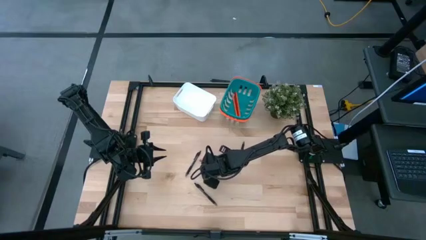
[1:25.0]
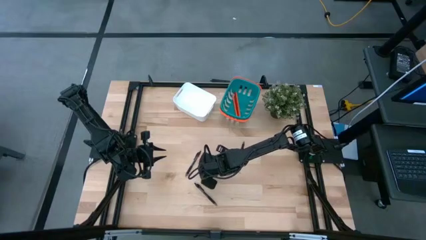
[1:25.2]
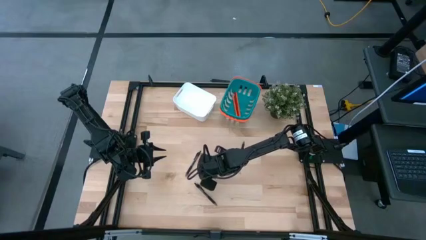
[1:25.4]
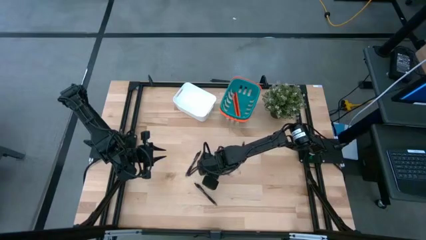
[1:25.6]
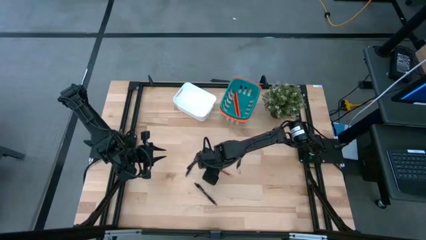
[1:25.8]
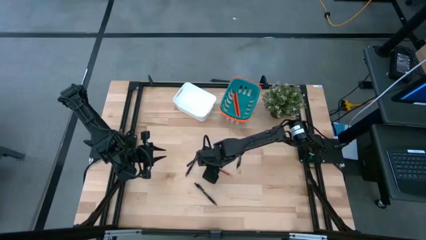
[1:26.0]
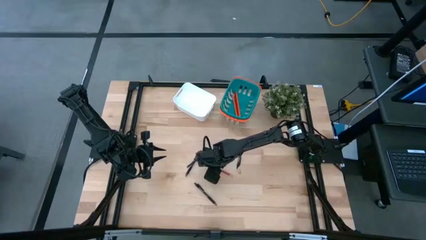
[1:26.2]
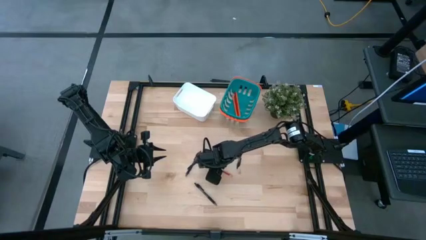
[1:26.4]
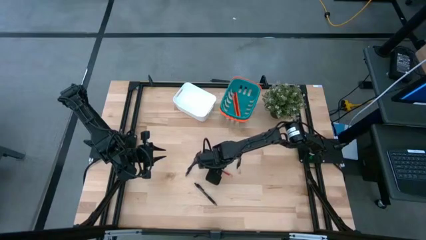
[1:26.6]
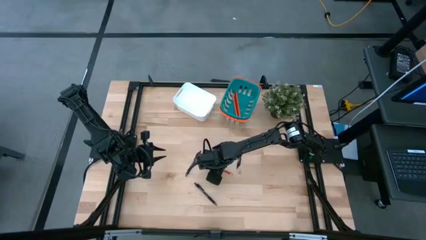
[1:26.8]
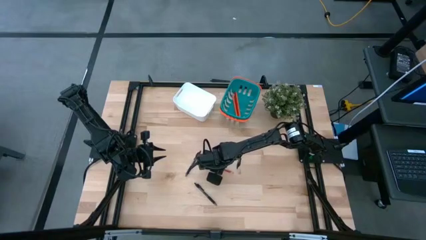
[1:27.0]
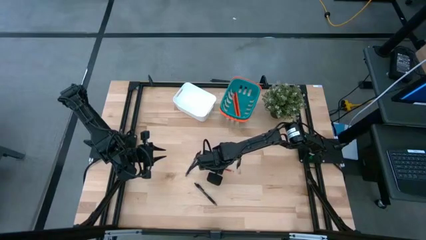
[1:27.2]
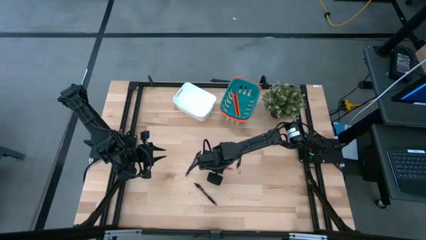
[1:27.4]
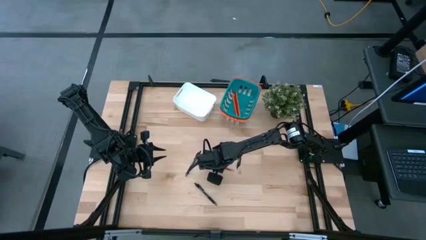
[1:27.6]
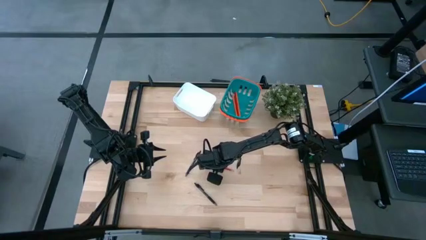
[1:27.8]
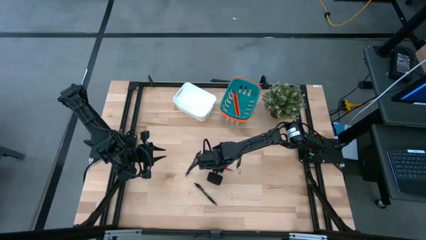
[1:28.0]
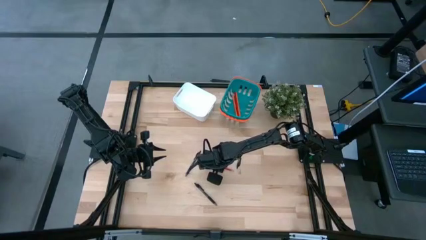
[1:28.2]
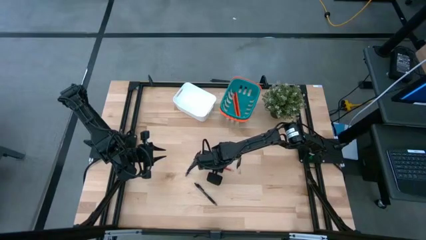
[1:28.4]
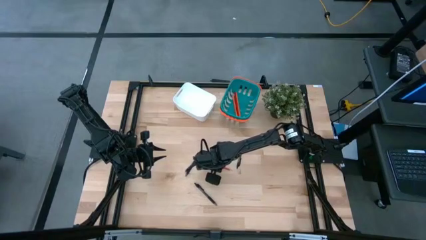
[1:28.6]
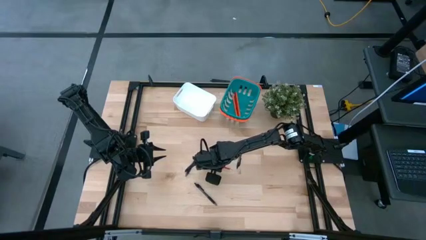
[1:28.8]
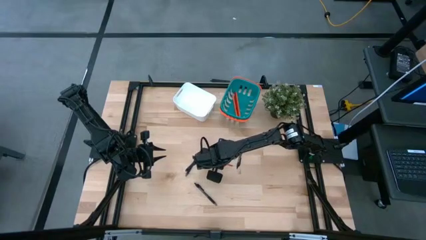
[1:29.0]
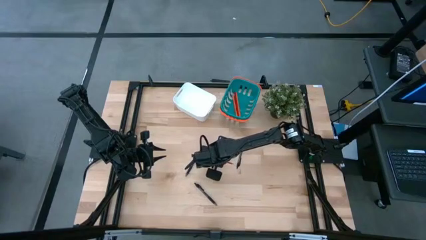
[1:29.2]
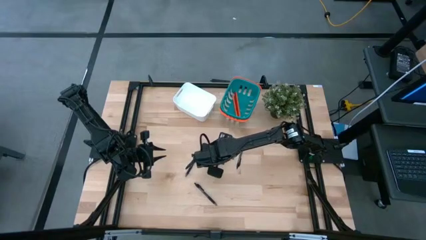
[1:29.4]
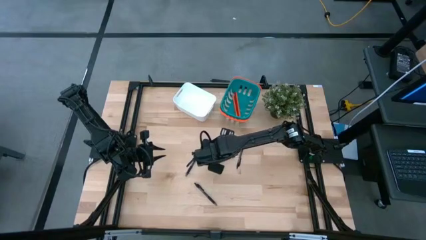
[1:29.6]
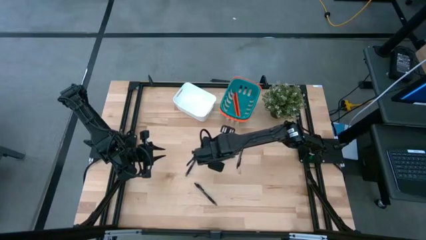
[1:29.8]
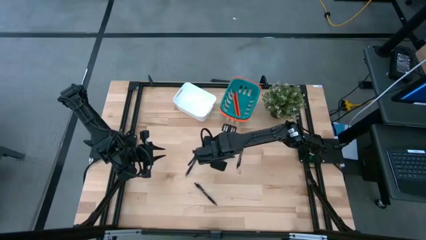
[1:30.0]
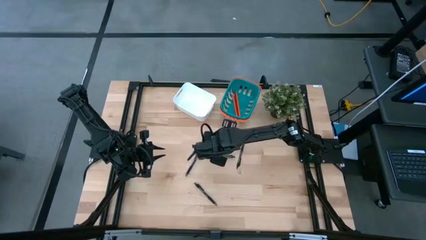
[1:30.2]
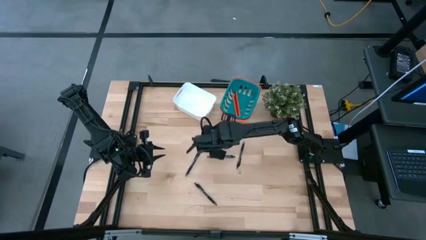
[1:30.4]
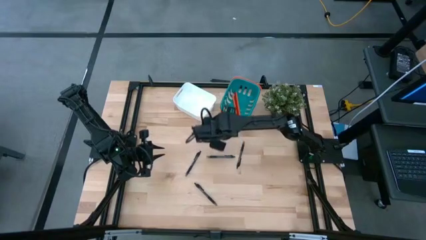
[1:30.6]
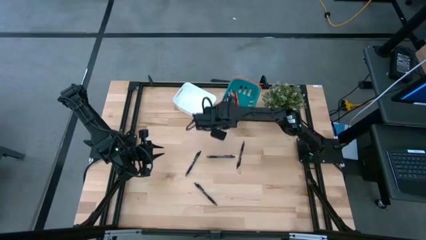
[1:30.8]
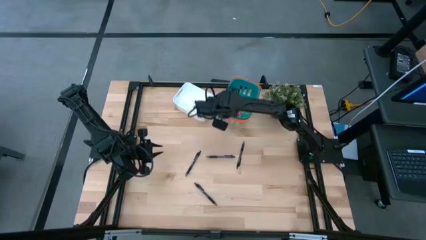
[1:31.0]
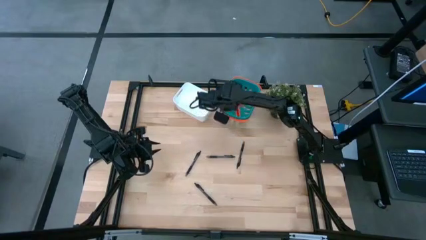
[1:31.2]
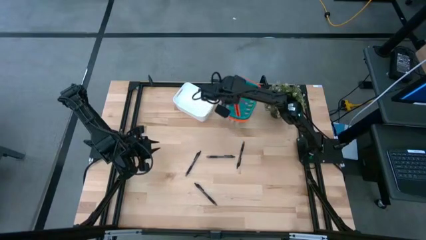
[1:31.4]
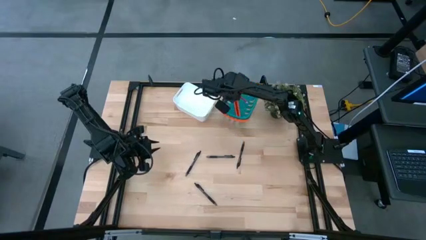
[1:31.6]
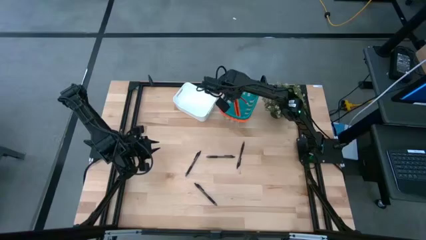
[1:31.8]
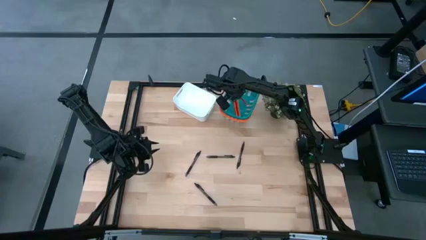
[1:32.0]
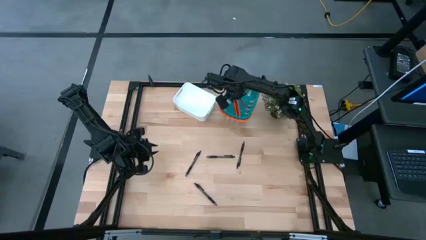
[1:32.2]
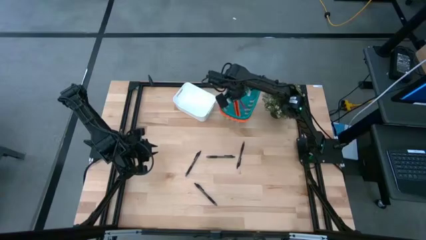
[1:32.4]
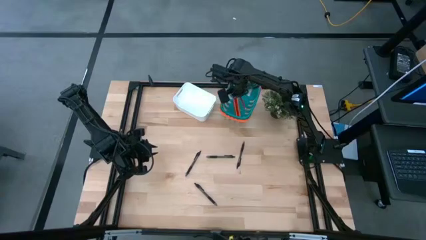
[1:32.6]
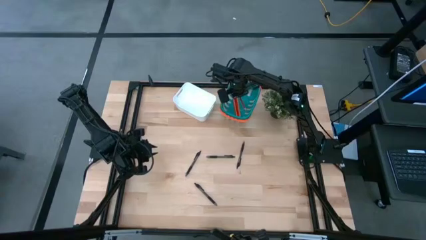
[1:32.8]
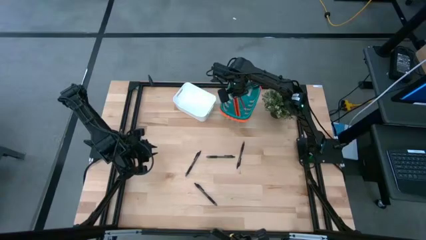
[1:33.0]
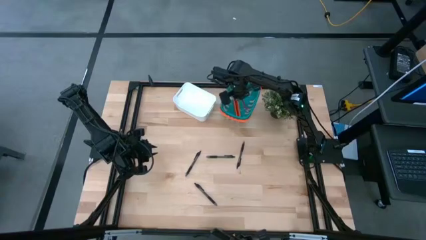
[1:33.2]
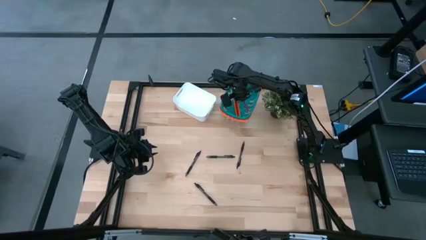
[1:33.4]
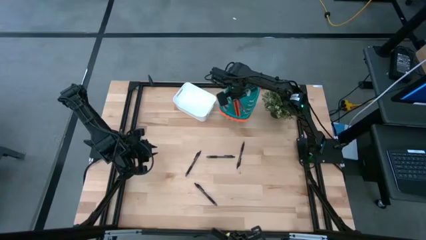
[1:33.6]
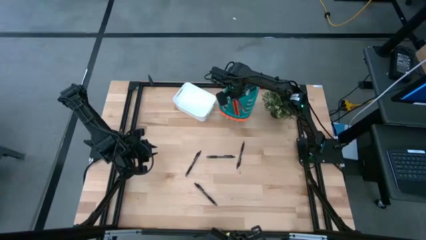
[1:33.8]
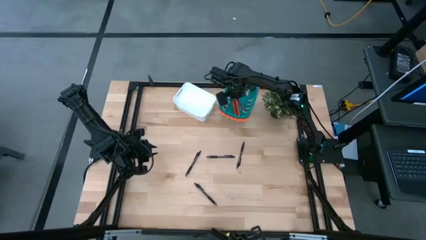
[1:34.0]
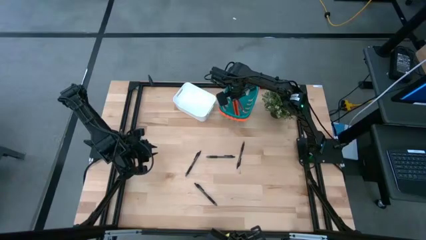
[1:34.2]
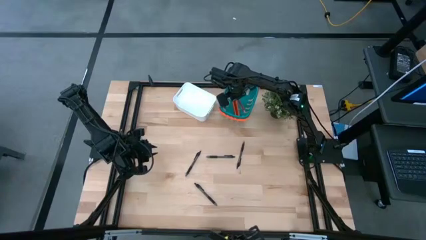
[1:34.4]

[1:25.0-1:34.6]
Task: Sort pens & pencils
Put the red pencil into the green basket

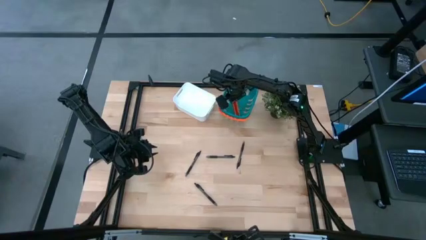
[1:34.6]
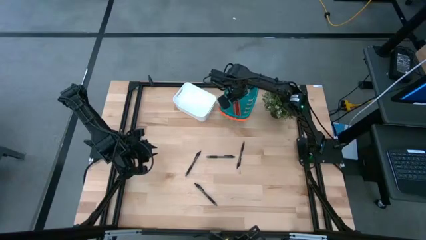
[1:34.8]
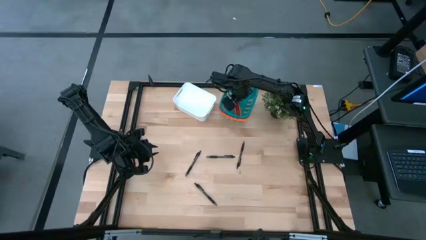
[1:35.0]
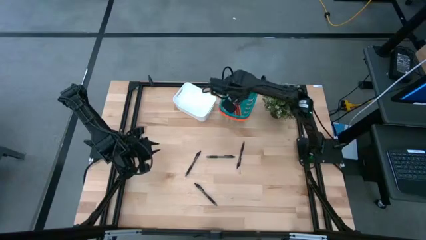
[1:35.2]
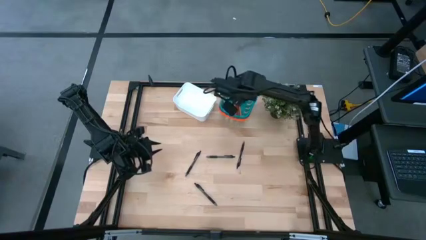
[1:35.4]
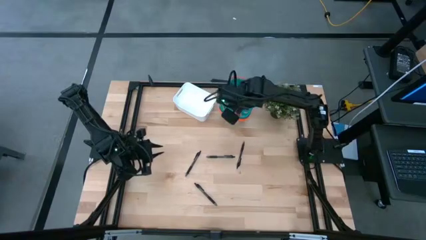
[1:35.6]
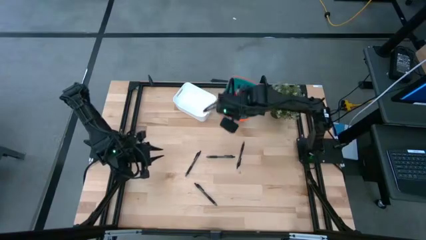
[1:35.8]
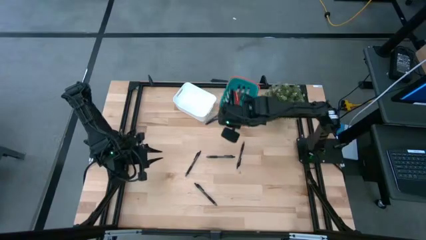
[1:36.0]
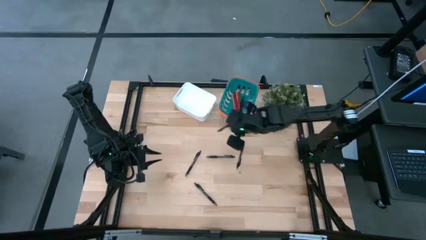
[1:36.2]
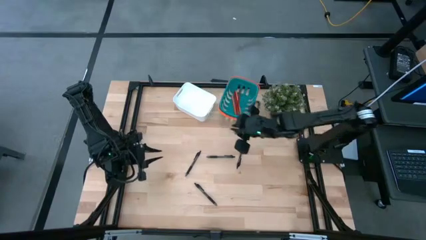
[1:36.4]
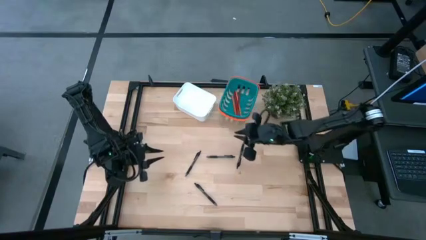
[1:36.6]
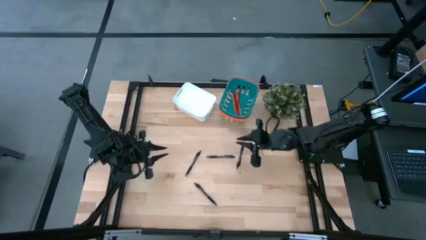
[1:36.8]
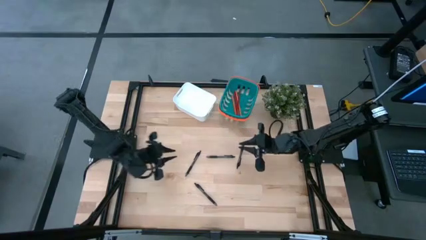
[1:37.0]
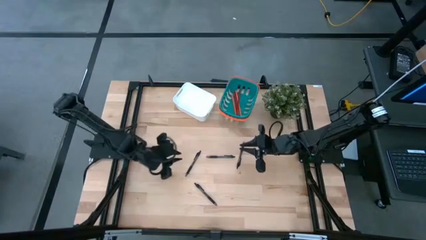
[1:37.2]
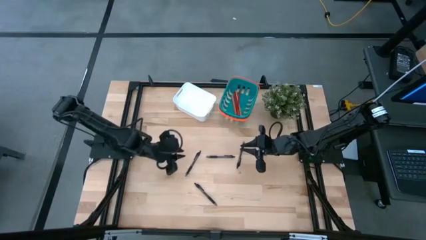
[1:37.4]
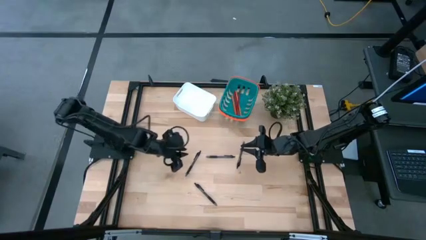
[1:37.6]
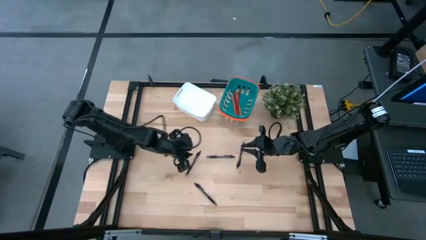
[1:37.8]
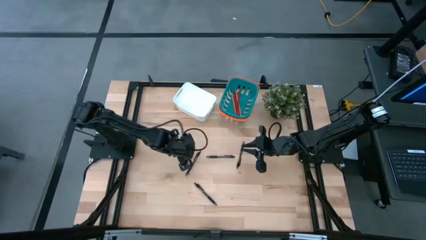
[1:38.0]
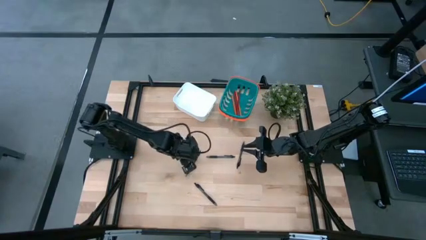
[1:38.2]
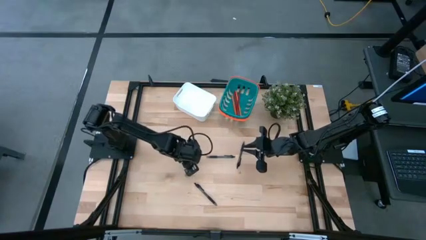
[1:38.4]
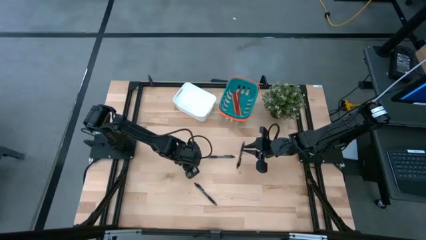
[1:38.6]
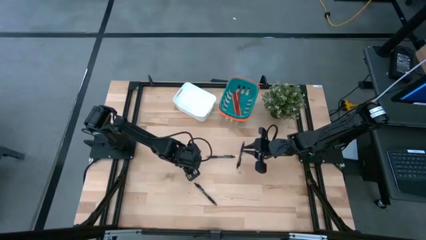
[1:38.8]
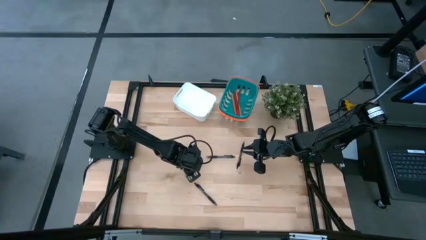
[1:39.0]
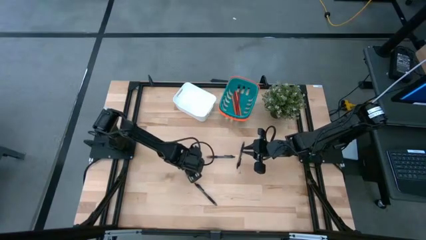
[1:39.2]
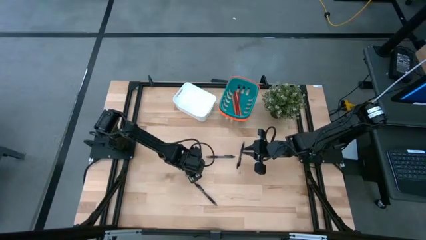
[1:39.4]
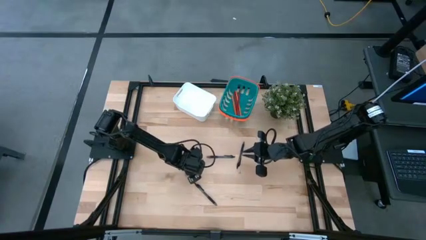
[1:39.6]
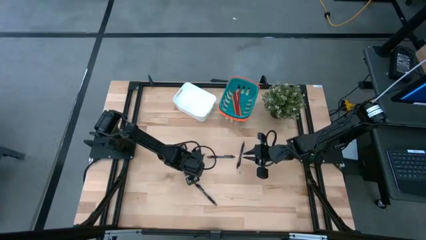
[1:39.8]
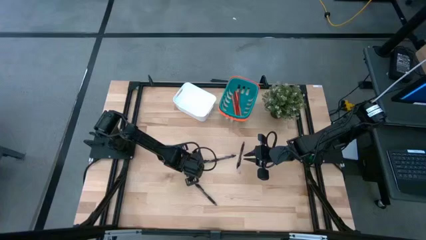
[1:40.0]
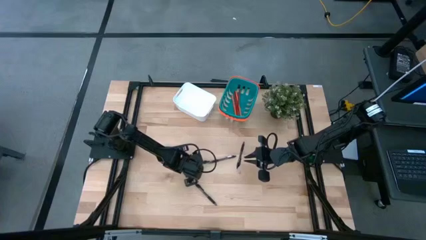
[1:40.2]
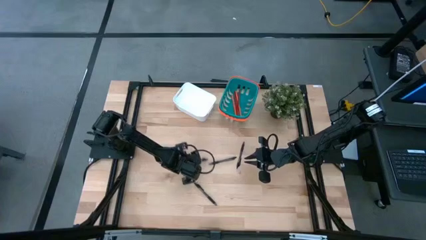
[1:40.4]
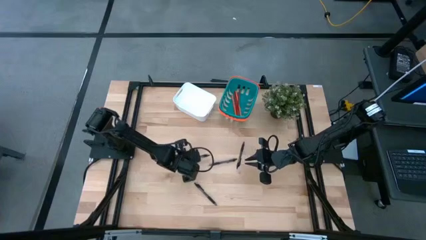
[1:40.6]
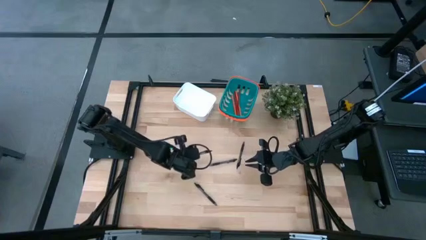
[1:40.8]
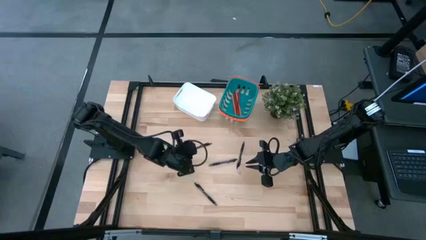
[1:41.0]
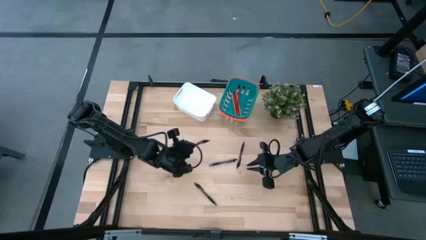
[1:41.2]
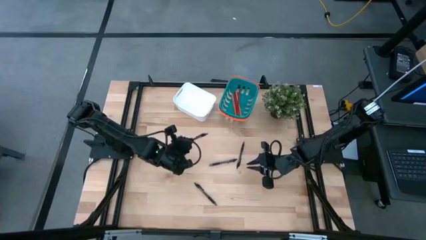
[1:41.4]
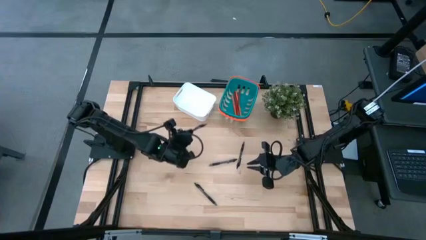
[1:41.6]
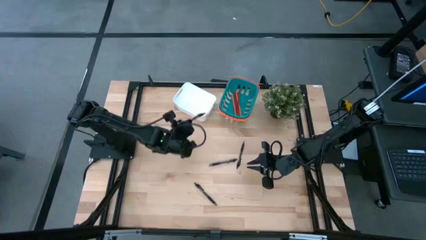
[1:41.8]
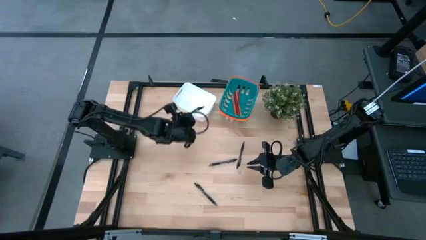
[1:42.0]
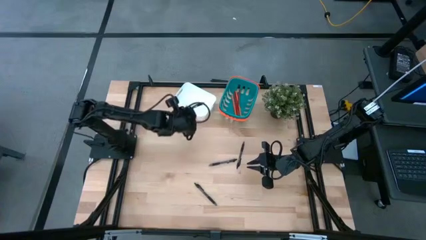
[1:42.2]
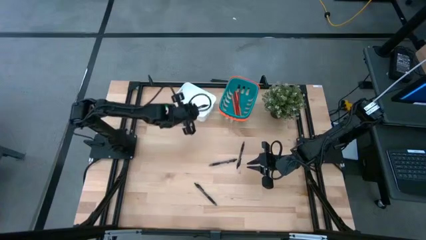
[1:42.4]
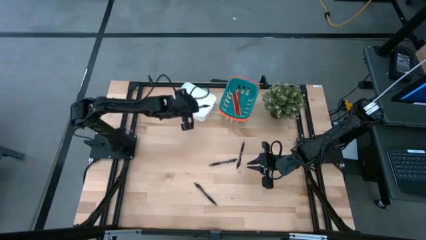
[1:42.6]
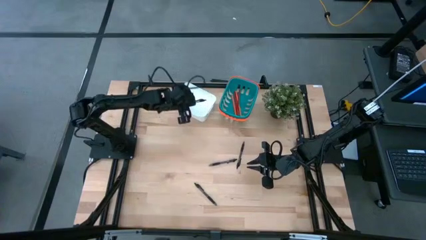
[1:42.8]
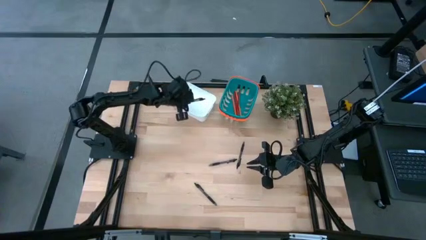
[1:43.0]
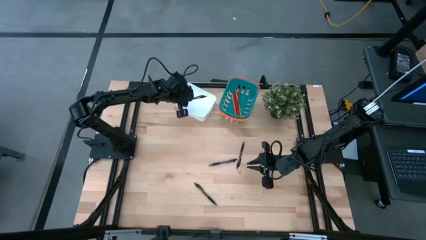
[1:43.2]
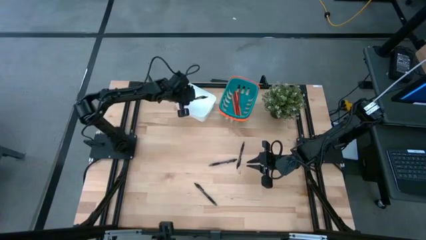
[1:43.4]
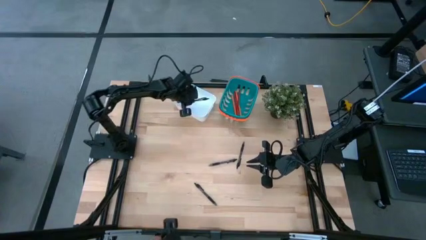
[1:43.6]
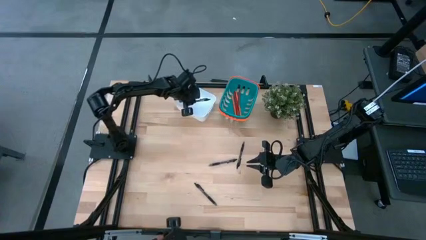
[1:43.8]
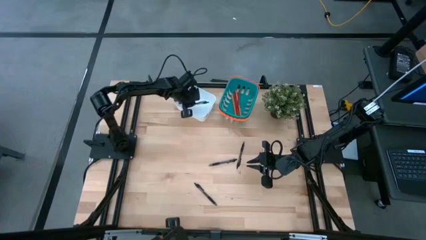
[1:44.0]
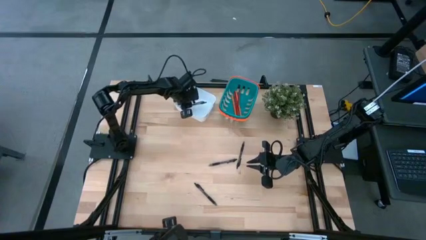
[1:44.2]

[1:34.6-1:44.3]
Put the black pen into the white bin
